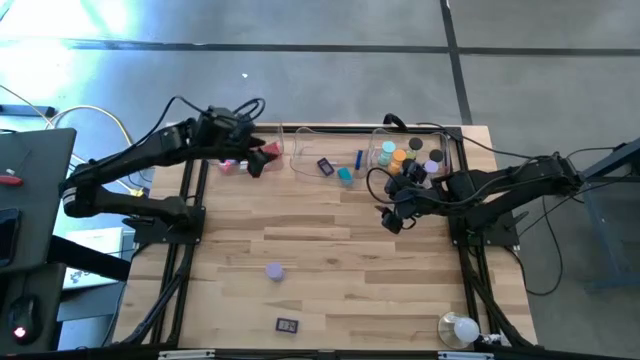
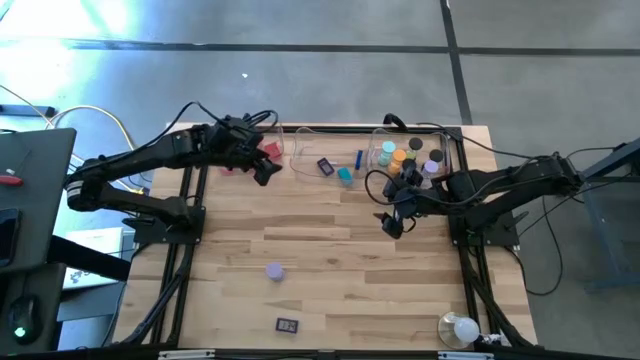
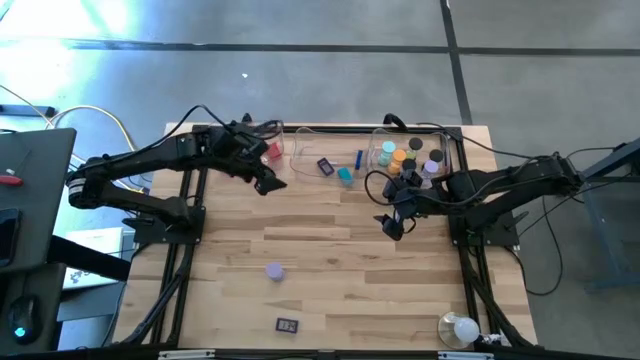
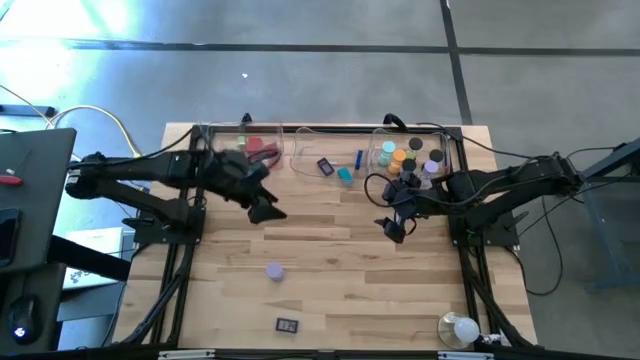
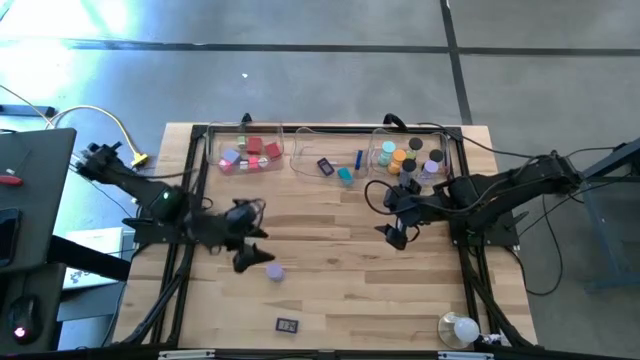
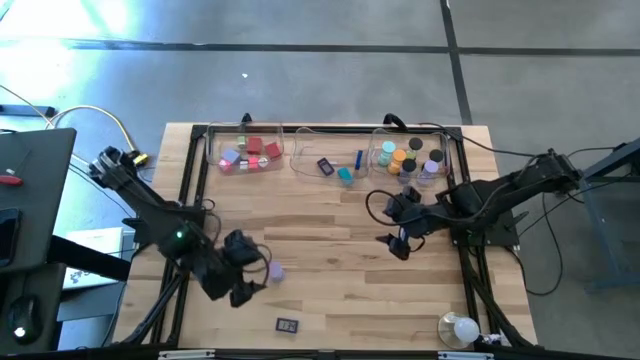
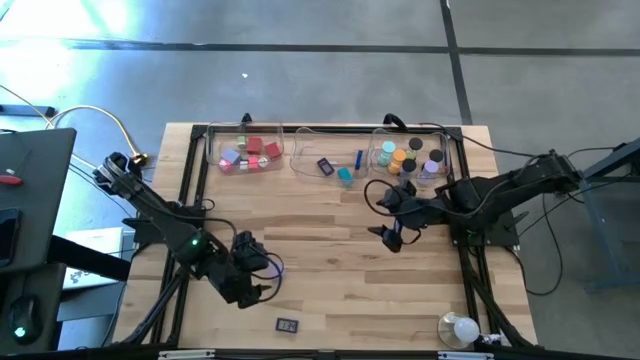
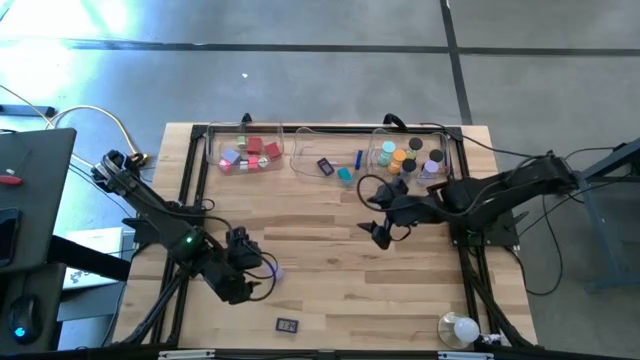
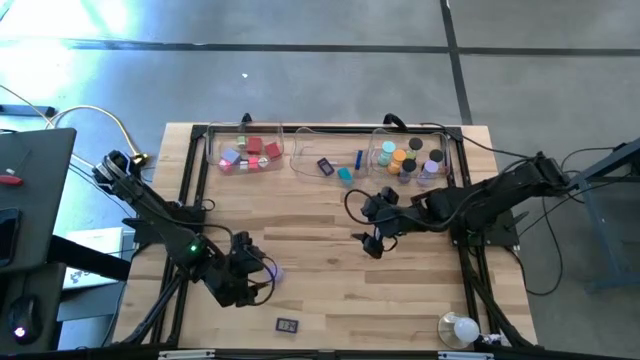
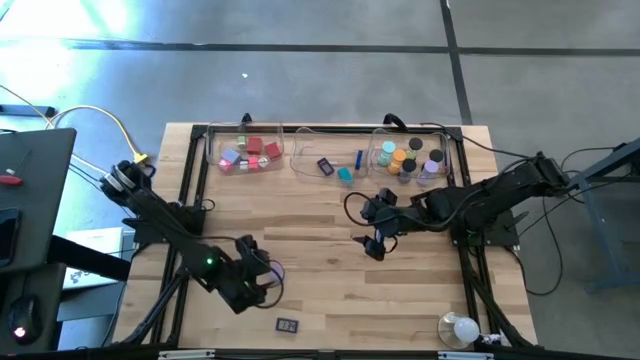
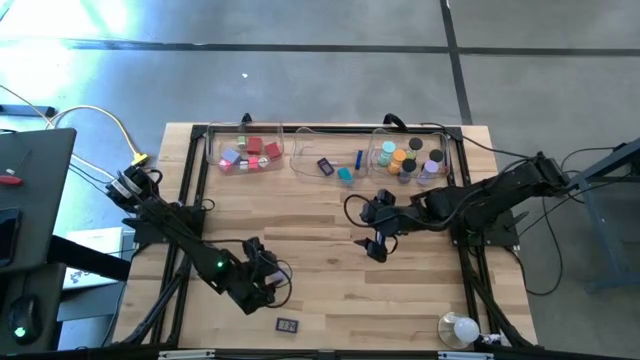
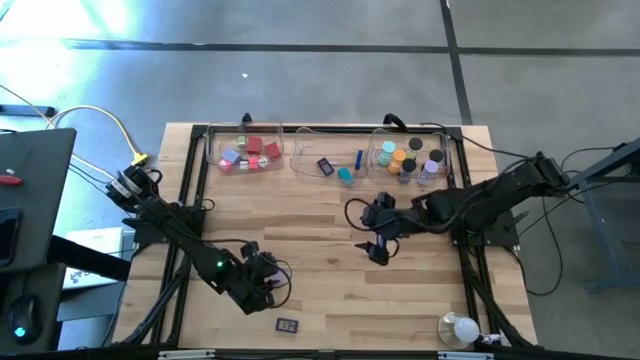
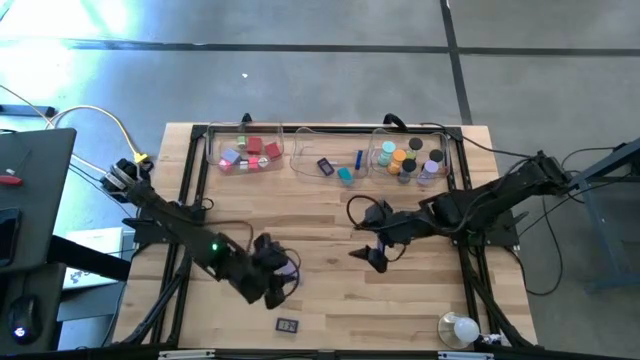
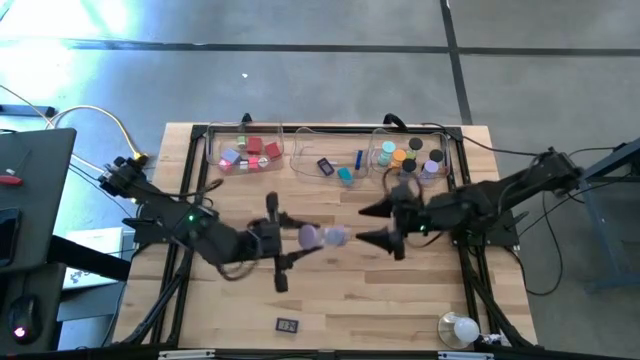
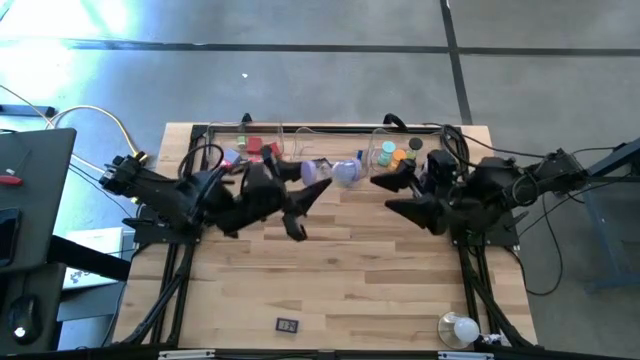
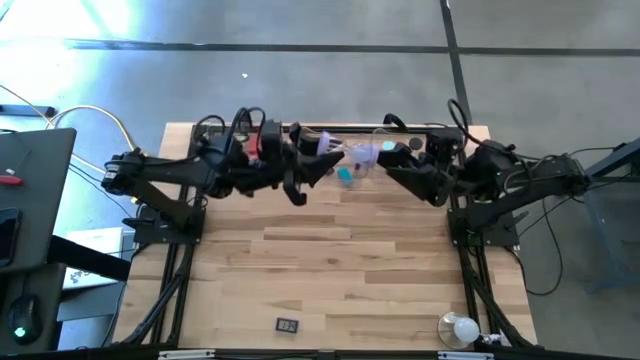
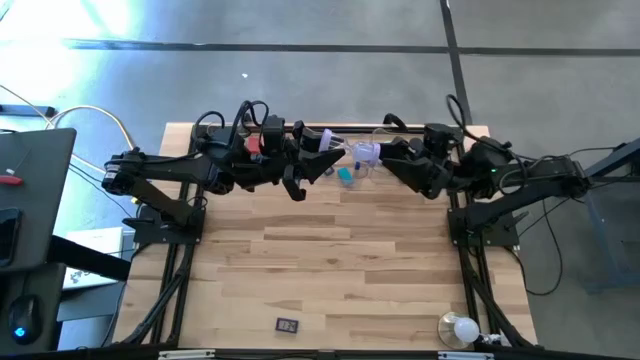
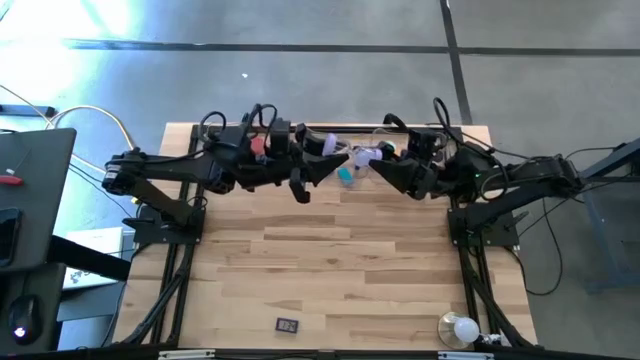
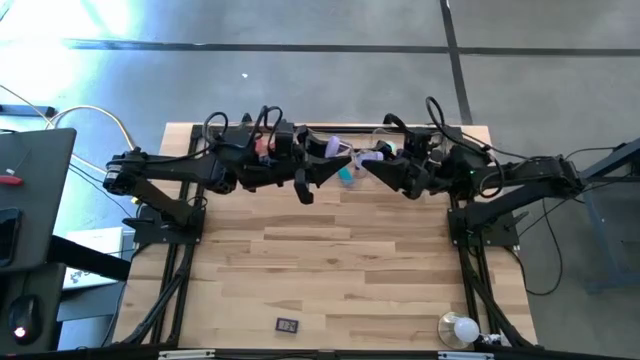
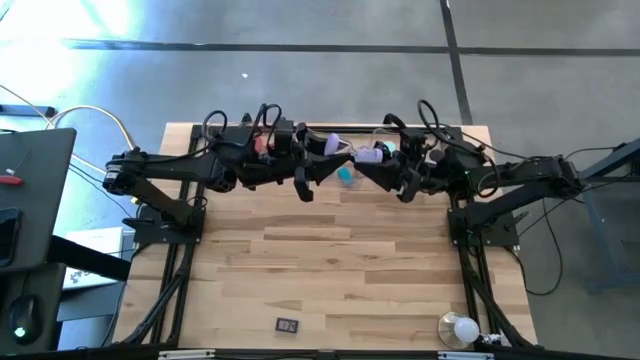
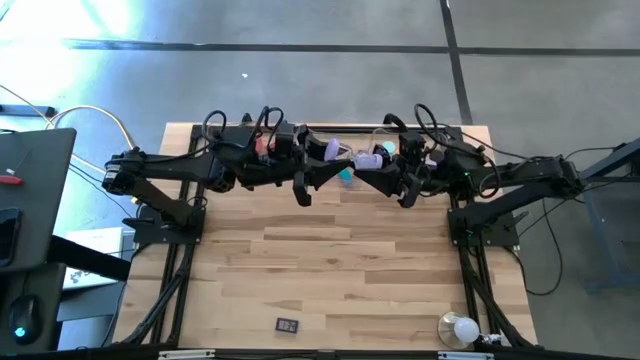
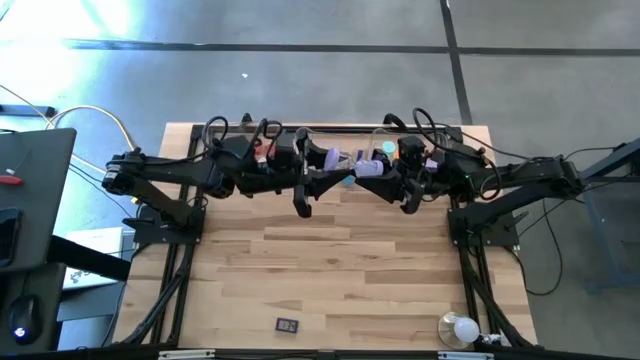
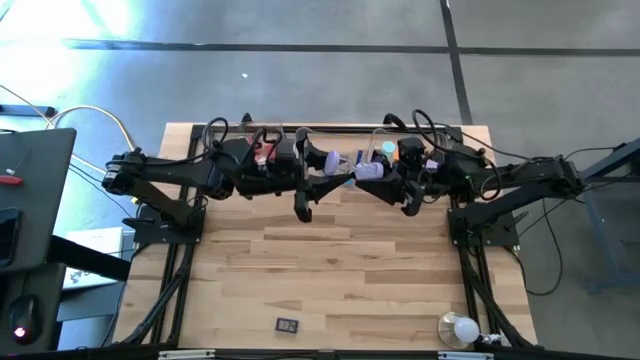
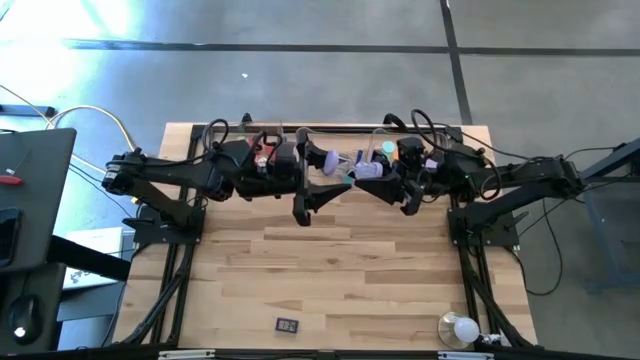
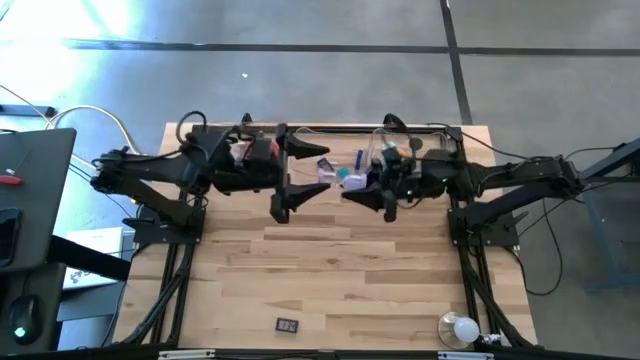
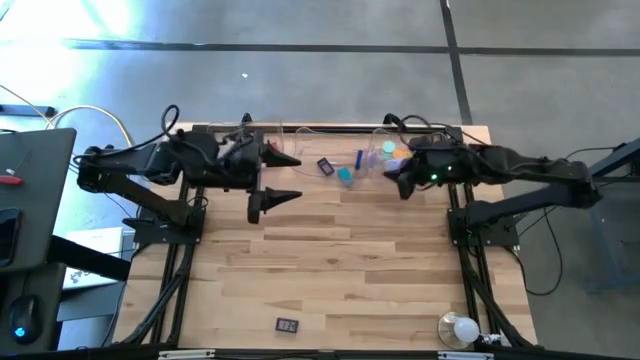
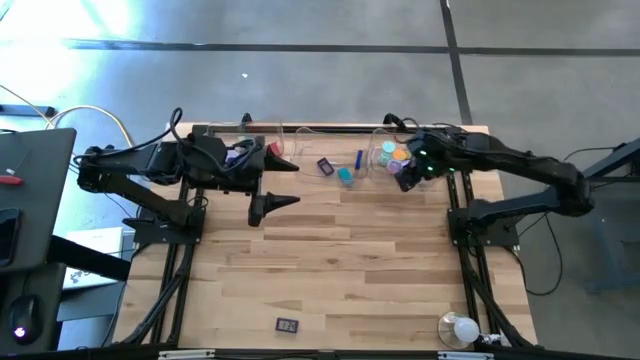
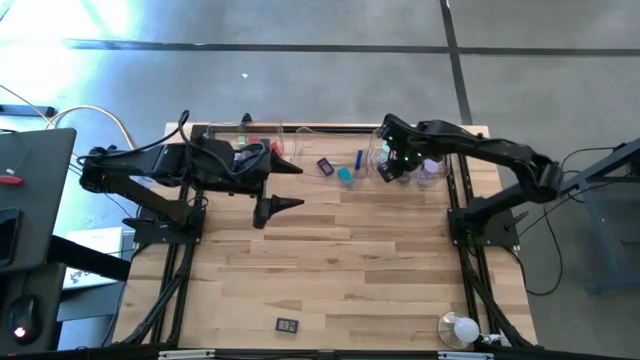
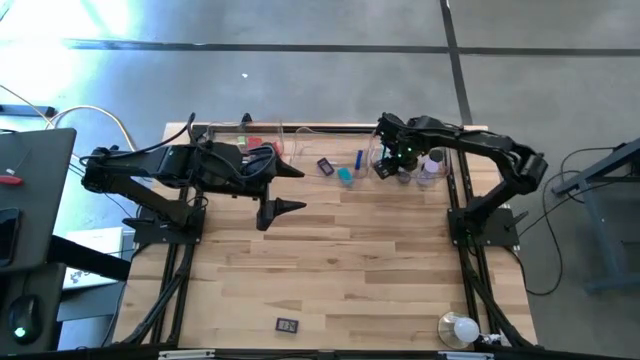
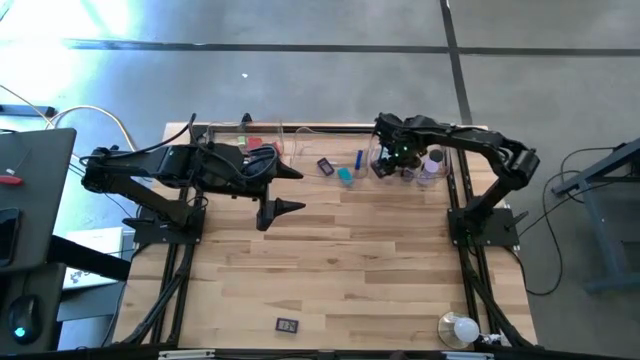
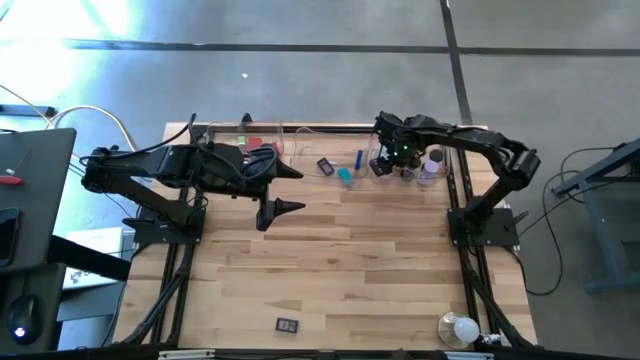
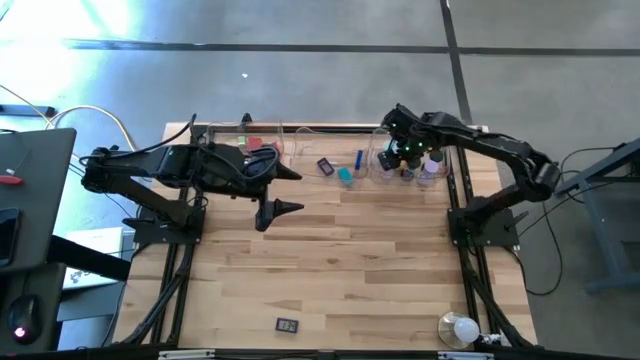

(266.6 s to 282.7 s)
Task: Pick & Place Office items
Put the light purple hourglass into the right transparent bin

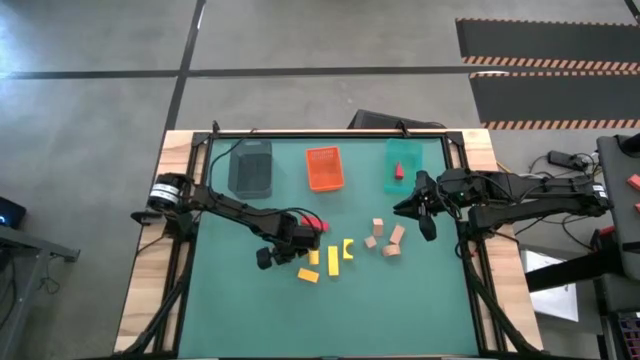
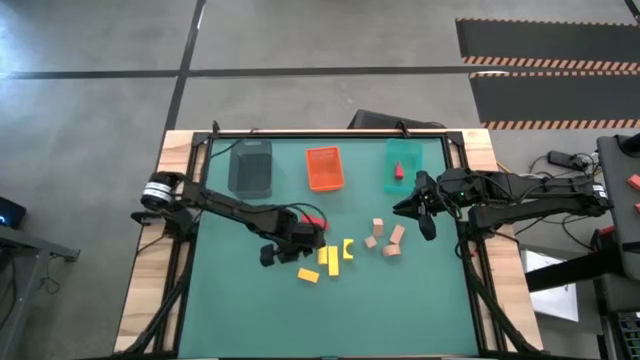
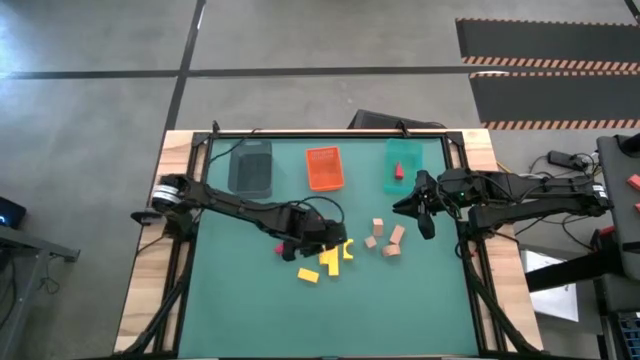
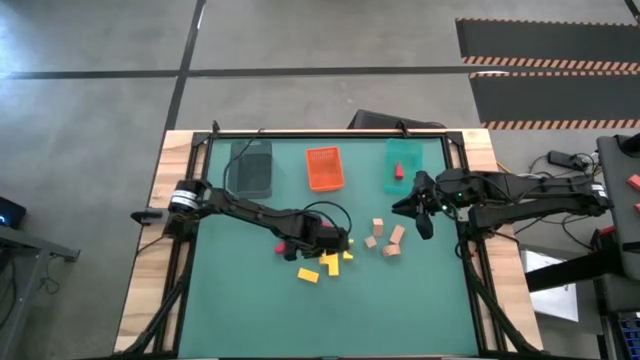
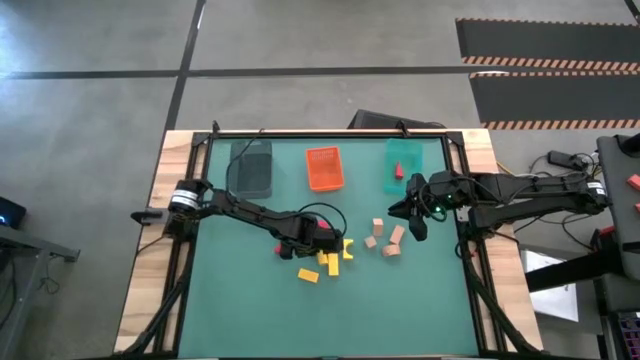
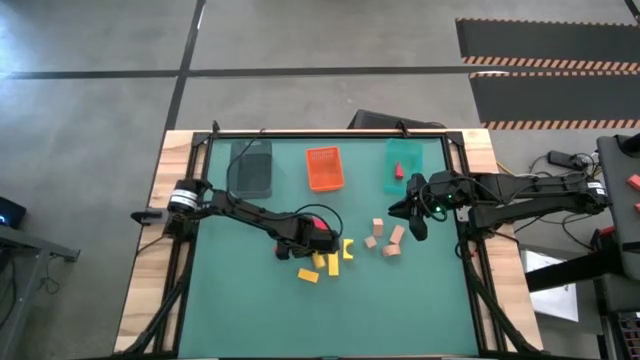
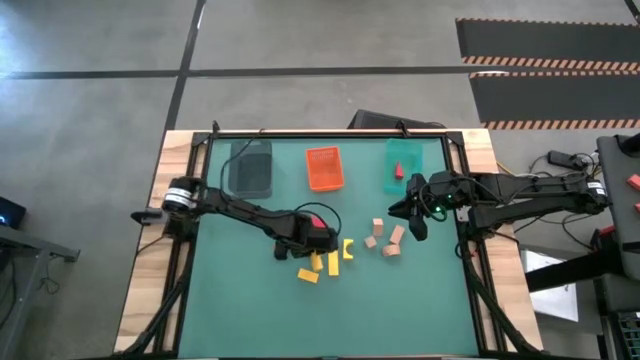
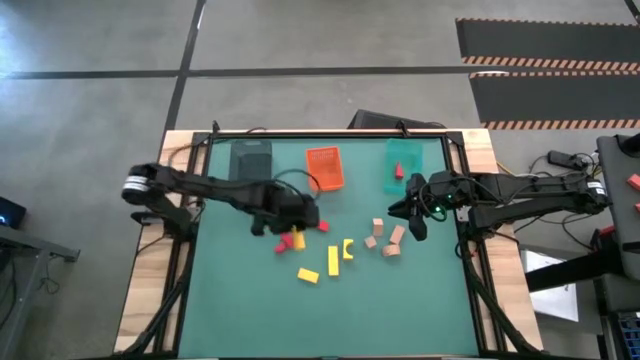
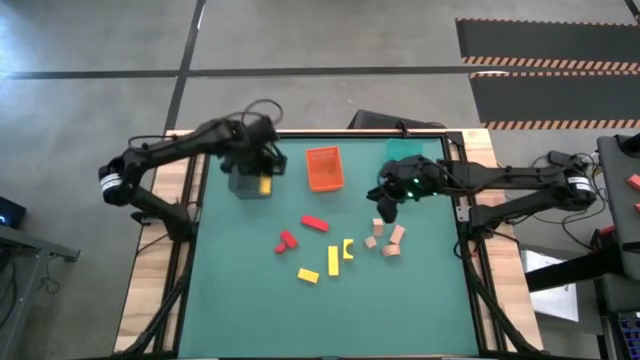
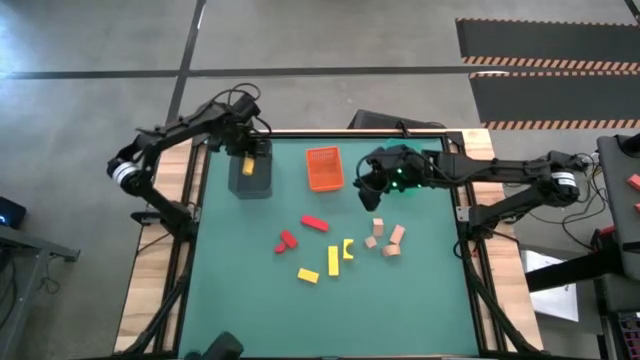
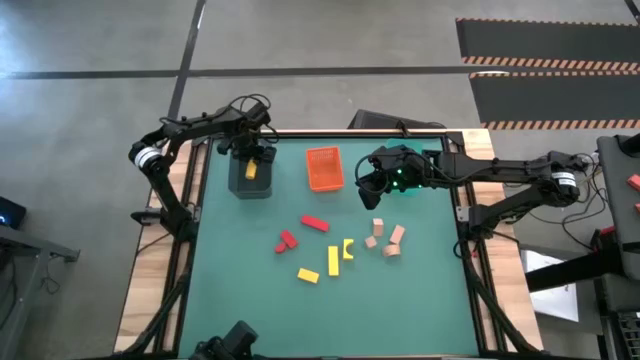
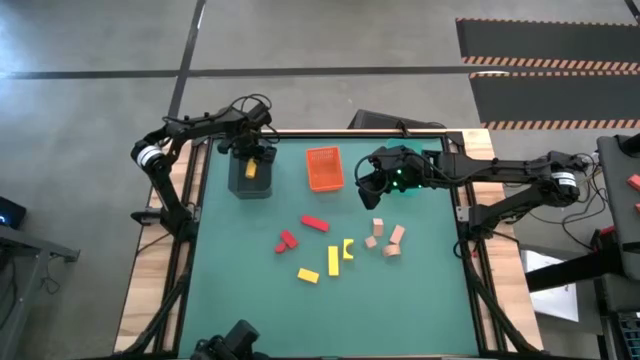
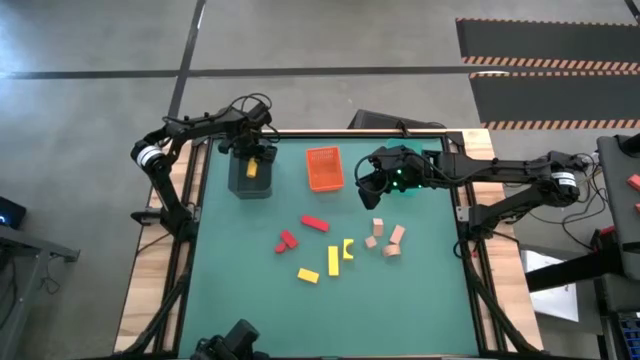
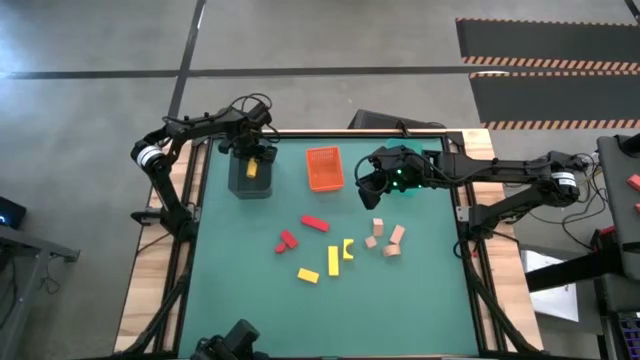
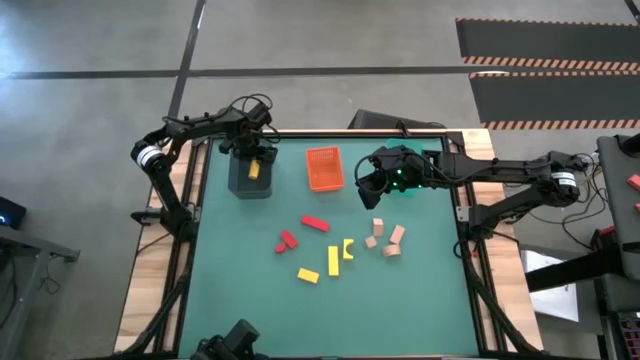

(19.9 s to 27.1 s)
Task: Sort & place blocks by color
Put the yellow block into the black bin
